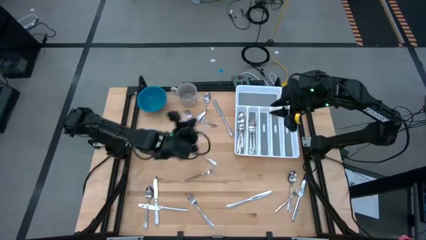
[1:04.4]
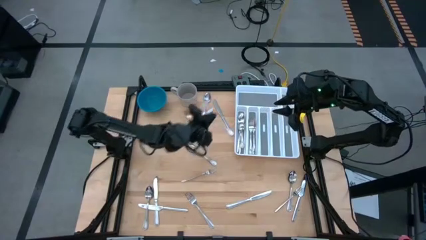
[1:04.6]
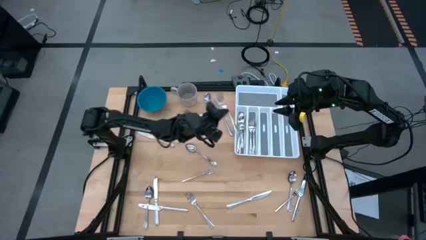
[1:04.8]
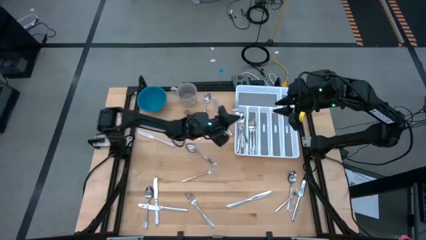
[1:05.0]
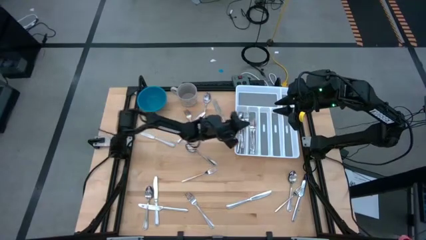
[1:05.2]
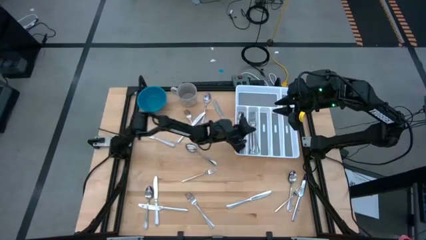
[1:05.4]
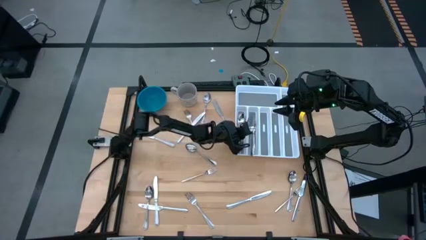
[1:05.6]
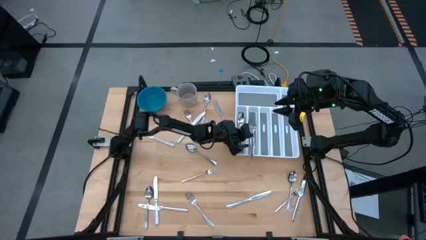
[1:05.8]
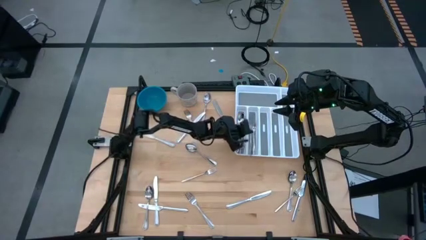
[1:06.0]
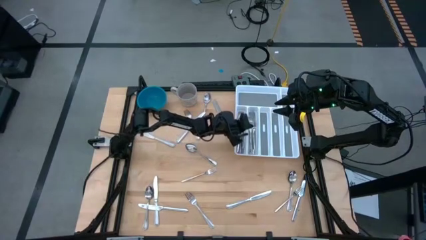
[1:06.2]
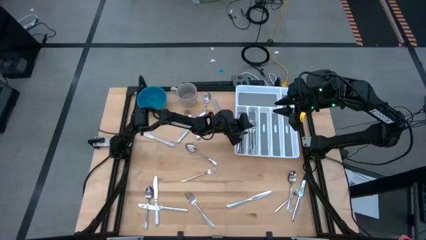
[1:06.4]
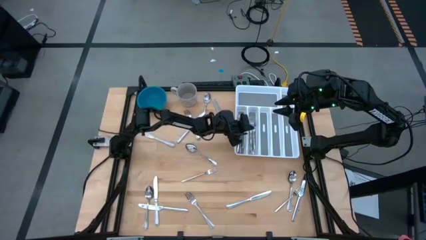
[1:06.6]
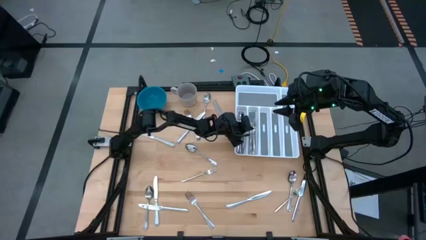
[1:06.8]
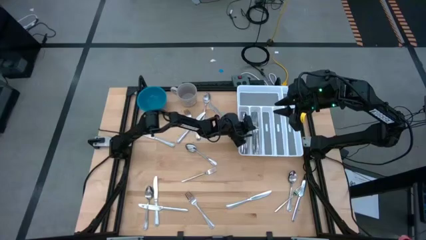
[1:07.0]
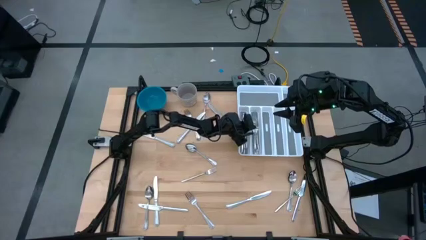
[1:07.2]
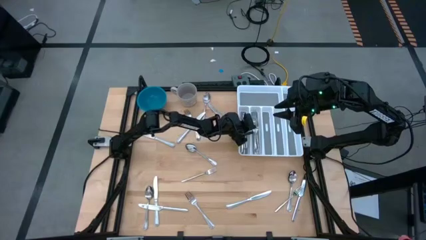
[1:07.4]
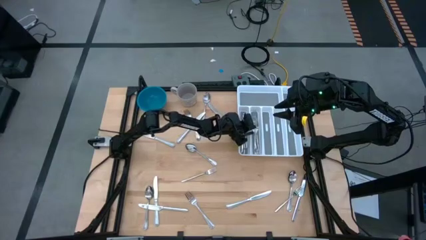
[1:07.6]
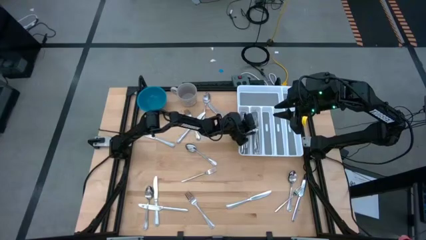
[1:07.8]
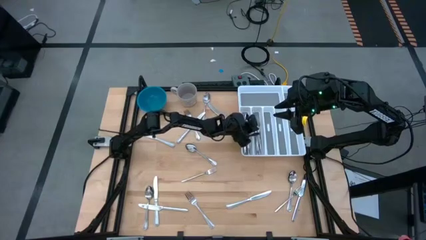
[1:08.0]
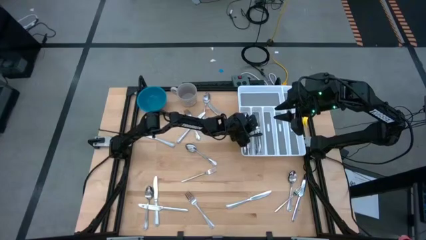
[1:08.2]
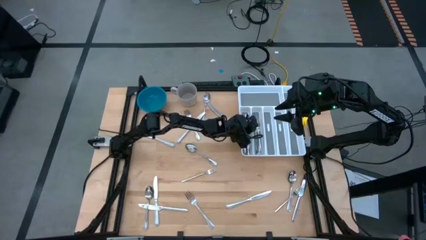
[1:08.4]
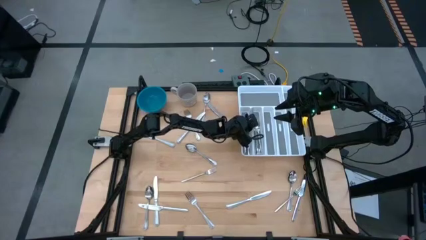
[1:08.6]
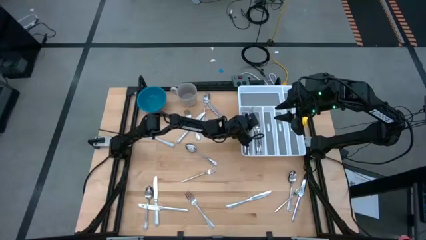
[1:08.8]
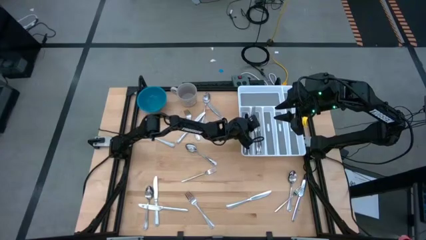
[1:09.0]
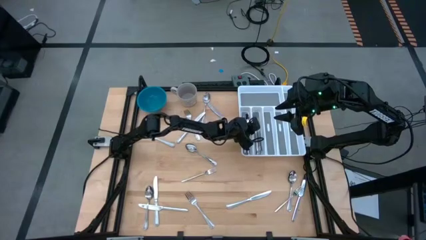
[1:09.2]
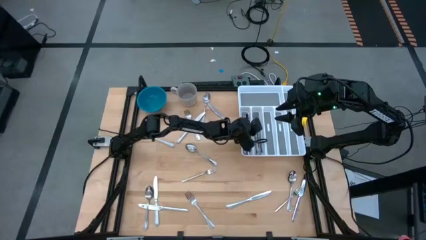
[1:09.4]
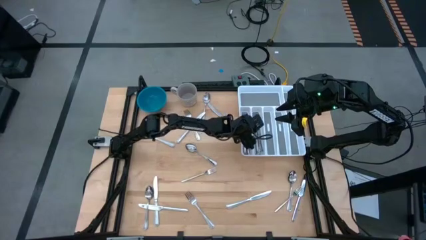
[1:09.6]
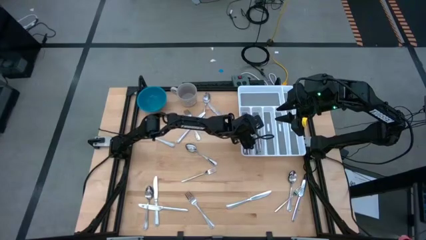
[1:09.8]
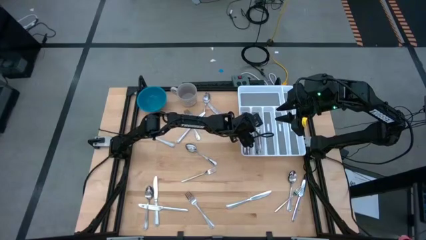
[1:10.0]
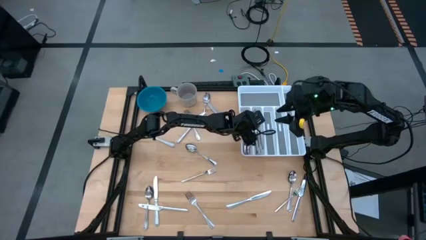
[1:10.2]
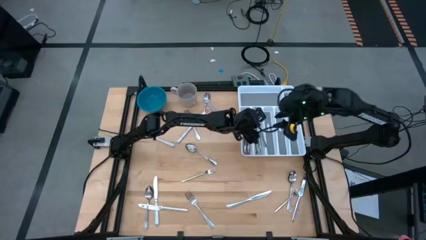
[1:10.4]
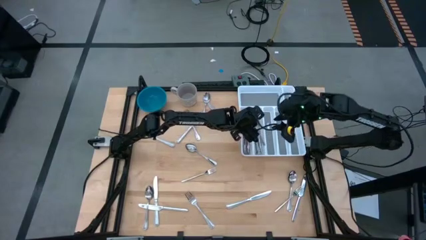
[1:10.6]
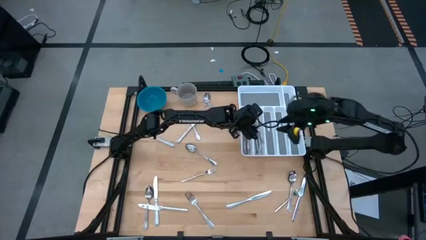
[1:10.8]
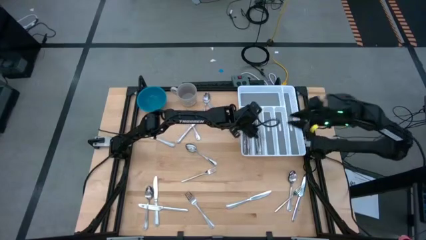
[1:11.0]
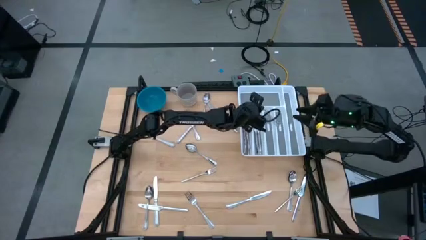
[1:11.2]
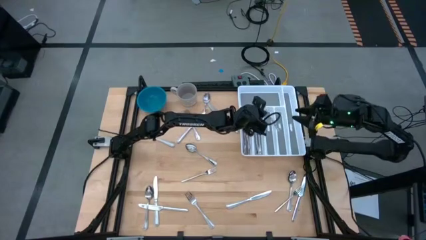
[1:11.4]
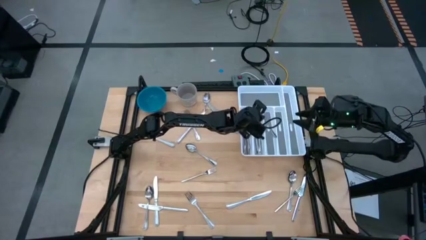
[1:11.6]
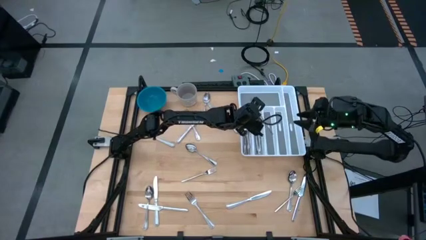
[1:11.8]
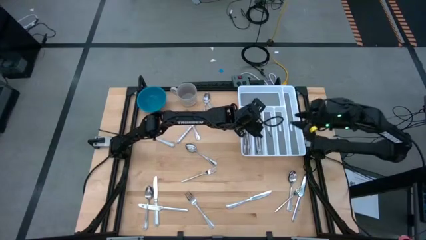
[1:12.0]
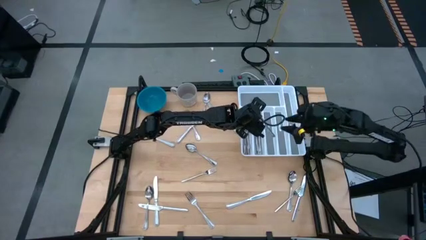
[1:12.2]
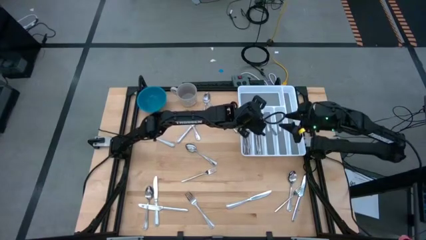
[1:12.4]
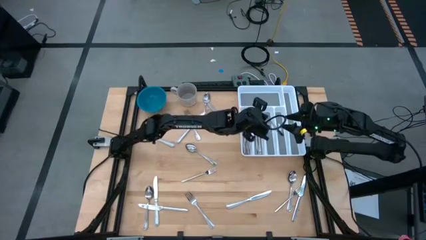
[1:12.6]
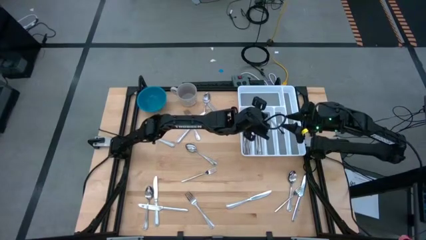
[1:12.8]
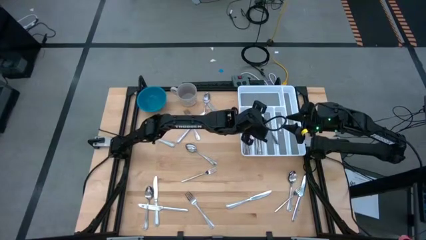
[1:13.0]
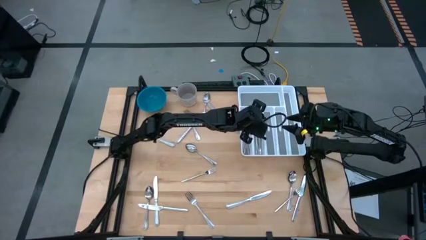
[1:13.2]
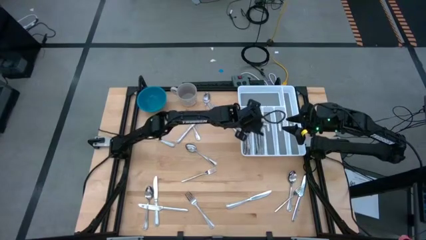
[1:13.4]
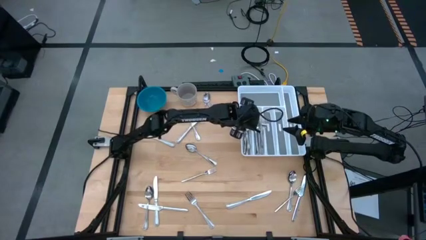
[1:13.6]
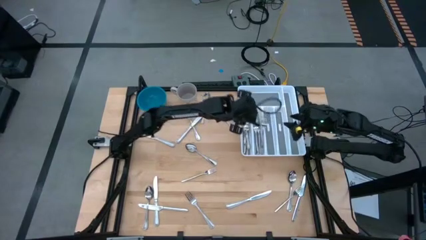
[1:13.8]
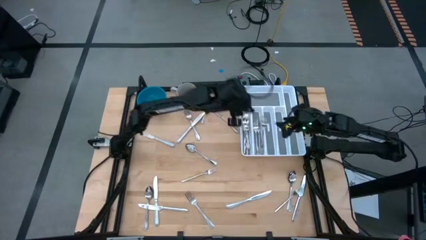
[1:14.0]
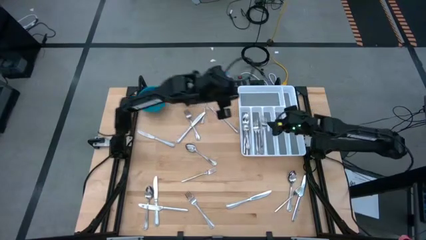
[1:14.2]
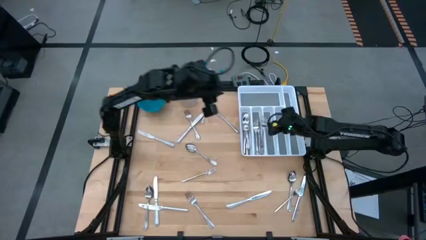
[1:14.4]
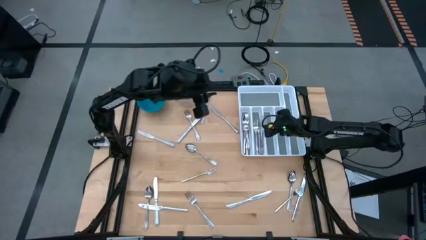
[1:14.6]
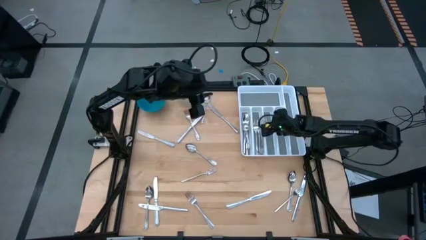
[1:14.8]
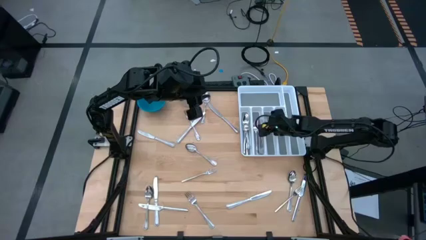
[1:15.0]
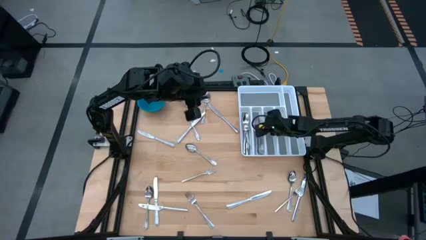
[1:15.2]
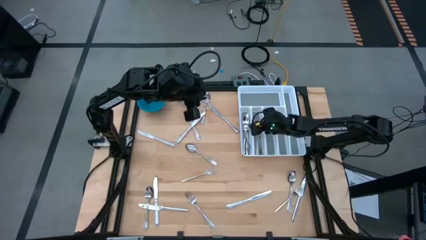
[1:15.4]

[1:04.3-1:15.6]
Task: Sort silverware
Put the fork in the silverware tray

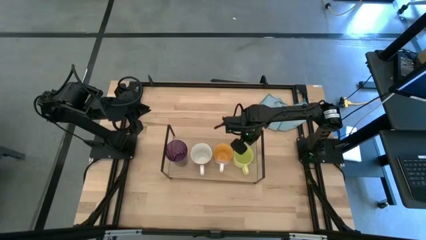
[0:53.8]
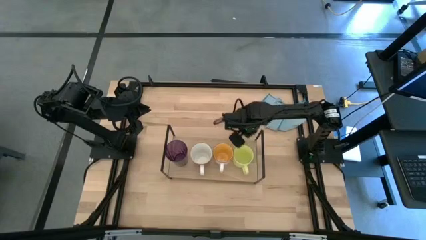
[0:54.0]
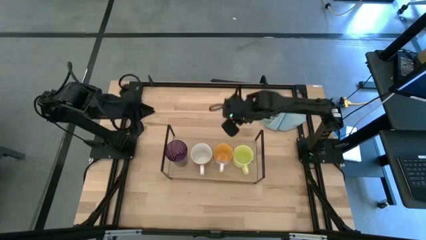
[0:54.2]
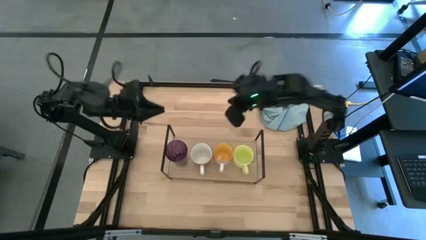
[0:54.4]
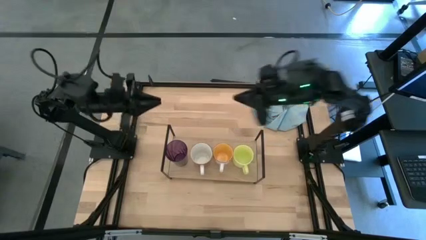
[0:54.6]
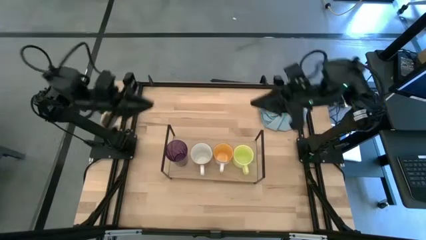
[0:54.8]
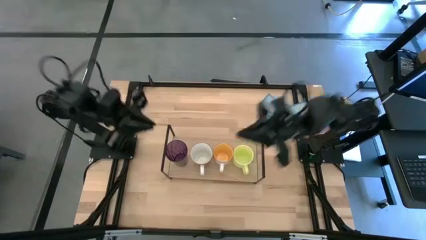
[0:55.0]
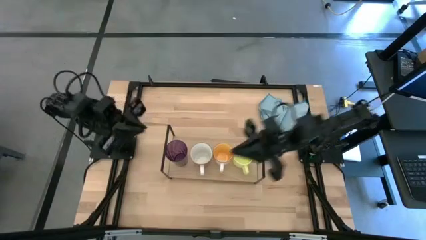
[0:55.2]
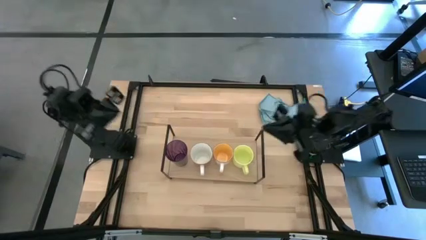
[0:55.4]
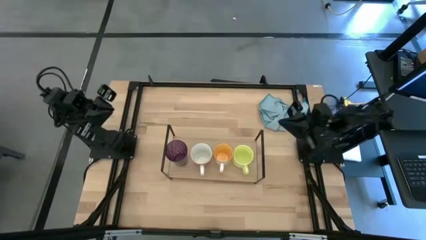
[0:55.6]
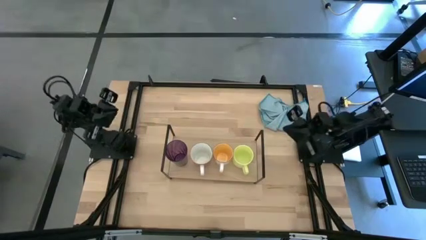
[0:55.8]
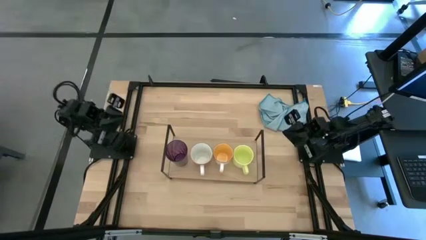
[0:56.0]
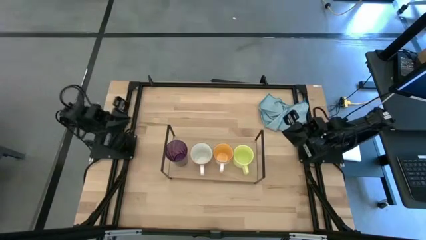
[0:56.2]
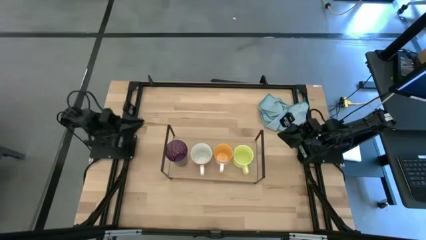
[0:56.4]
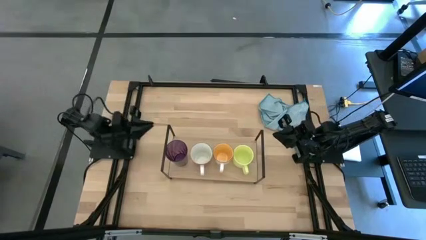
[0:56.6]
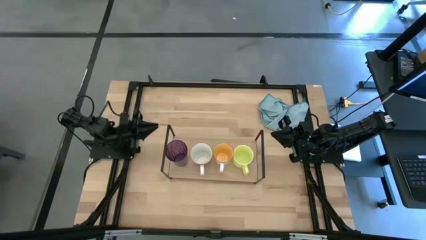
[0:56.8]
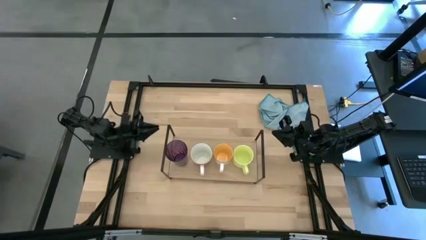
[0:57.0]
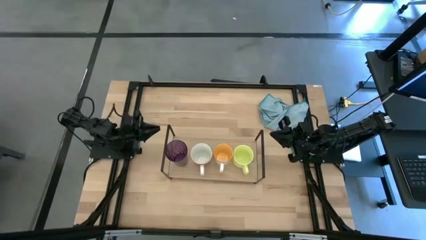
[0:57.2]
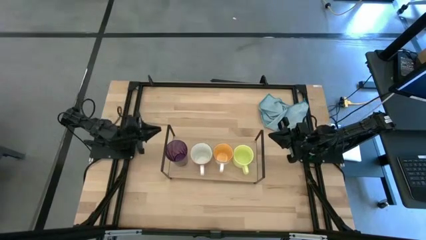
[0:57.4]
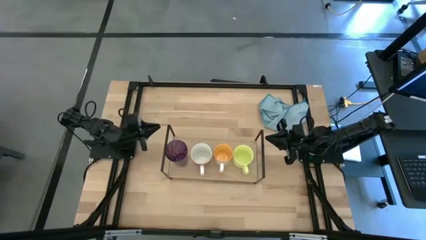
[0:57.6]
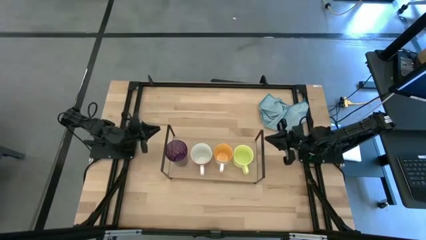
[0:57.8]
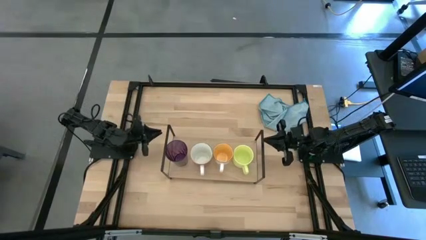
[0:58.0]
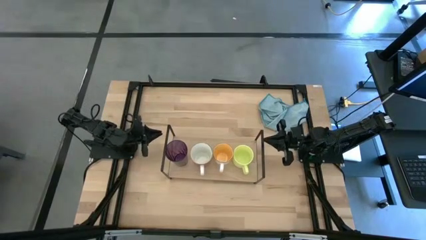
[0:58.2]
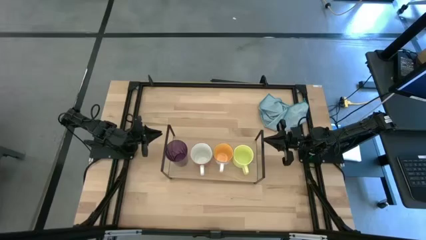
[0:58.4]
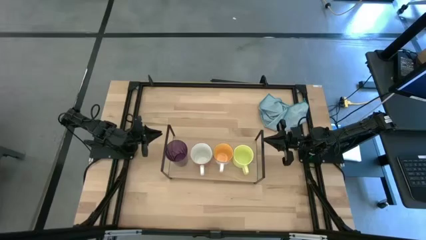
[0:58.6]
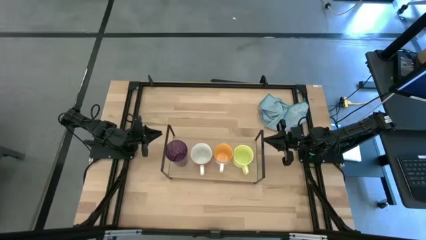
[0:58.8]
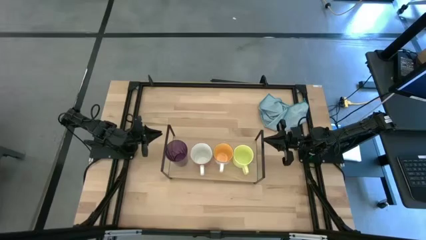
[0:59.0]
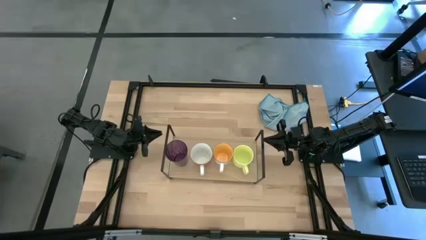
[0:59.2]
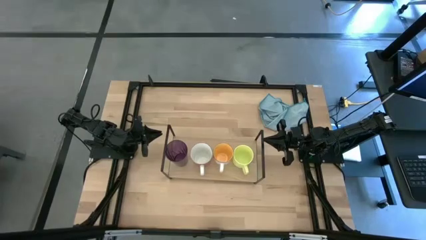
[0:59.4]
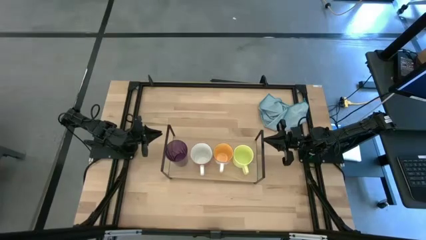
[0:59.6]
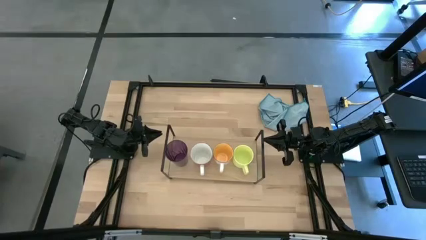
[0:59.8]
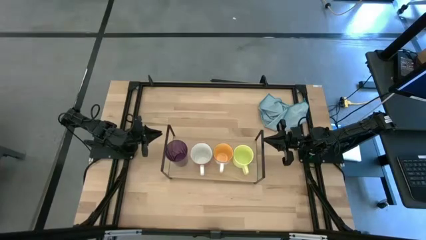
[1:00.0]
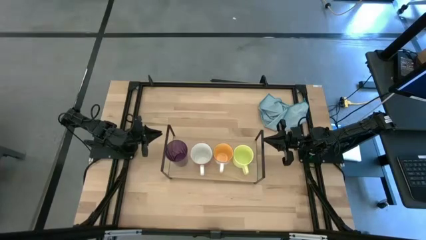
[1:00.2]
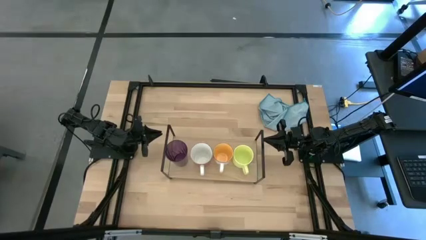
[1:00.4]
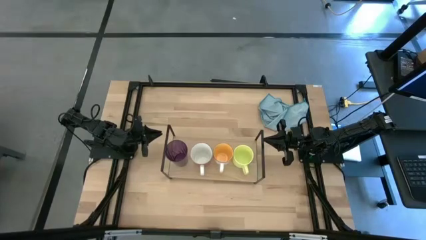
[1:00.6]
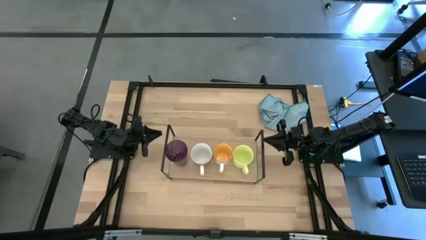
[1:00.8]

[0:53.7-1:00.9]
Task: Stack small to large cups/mugs on shelf
Return to Home Position
